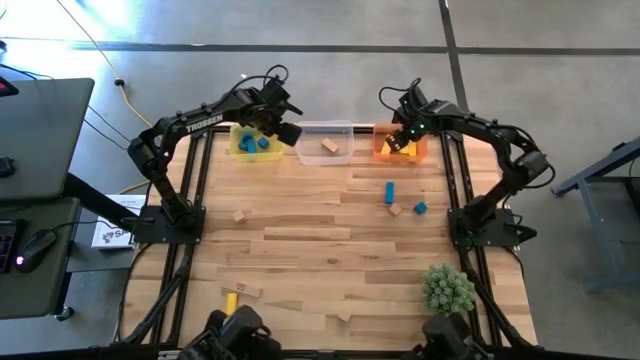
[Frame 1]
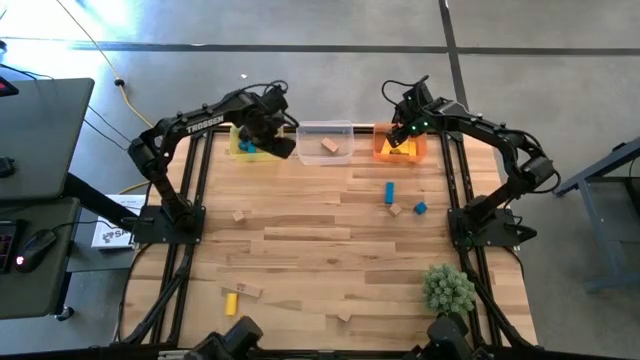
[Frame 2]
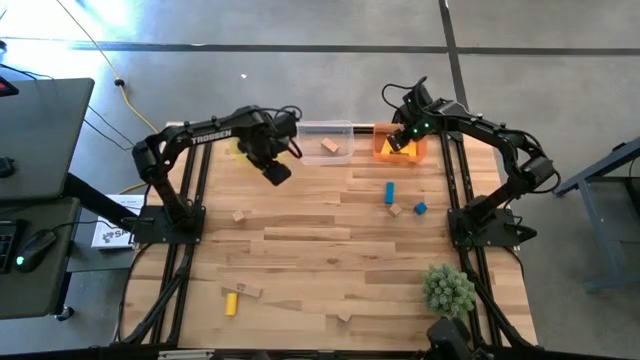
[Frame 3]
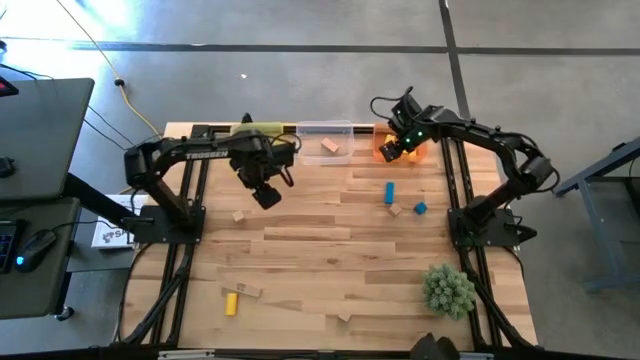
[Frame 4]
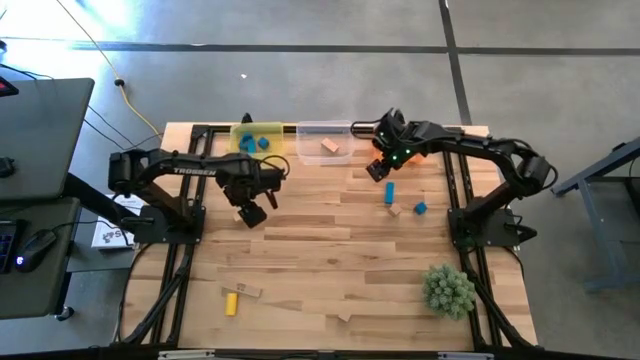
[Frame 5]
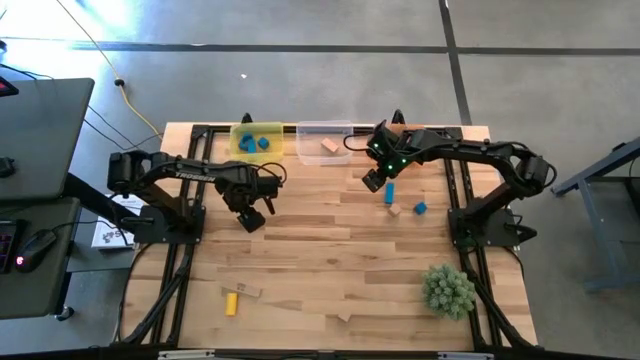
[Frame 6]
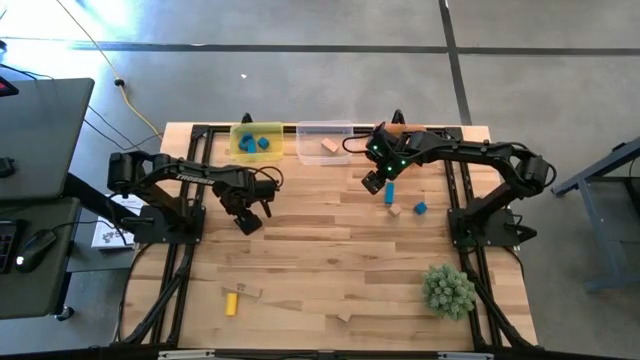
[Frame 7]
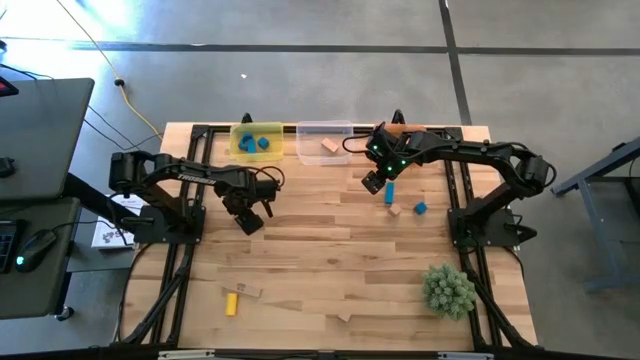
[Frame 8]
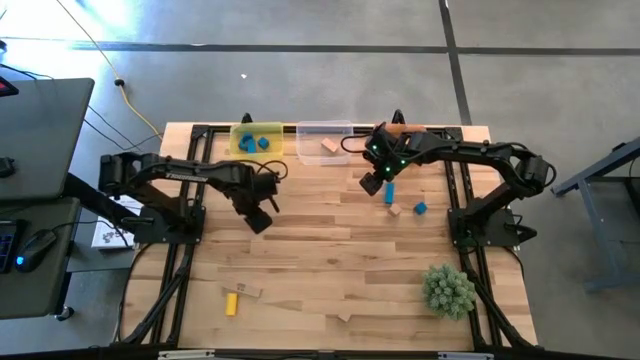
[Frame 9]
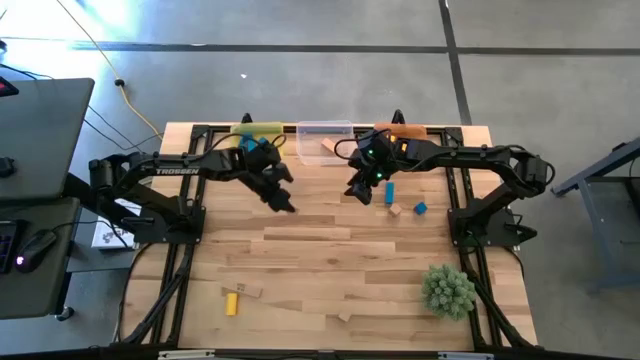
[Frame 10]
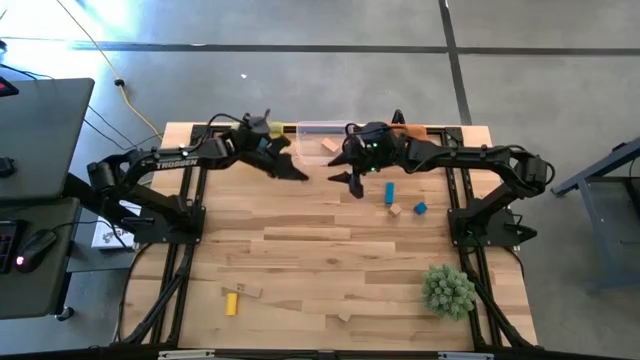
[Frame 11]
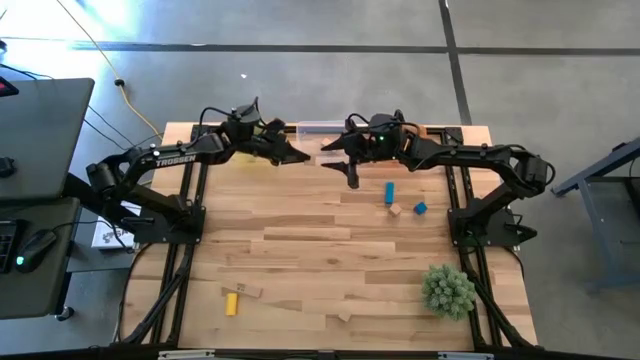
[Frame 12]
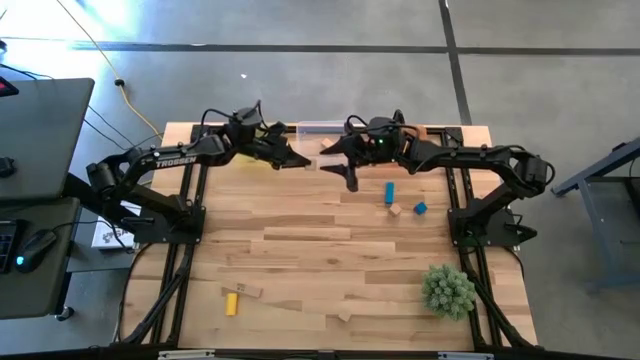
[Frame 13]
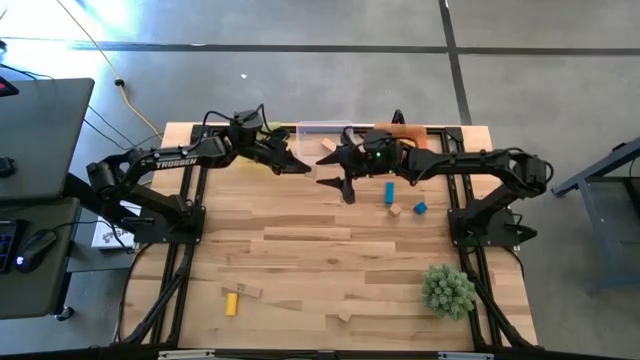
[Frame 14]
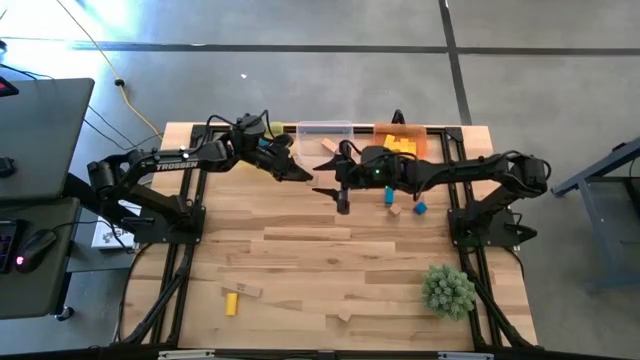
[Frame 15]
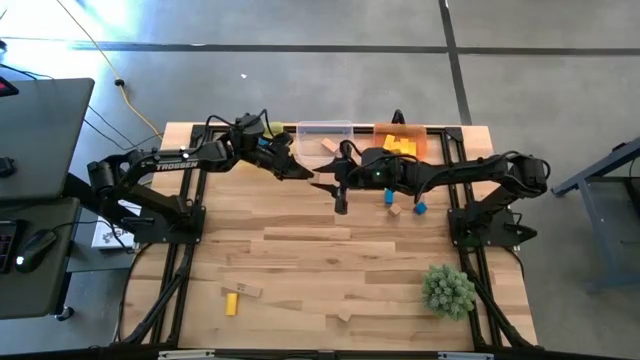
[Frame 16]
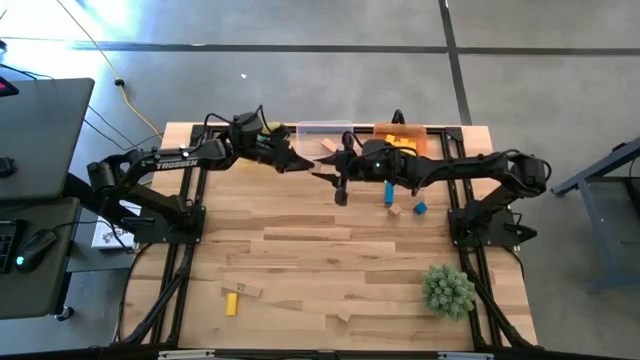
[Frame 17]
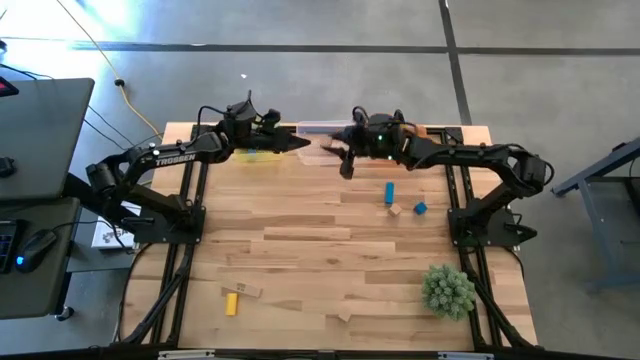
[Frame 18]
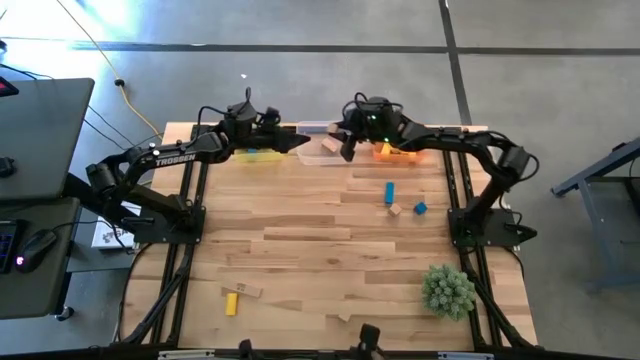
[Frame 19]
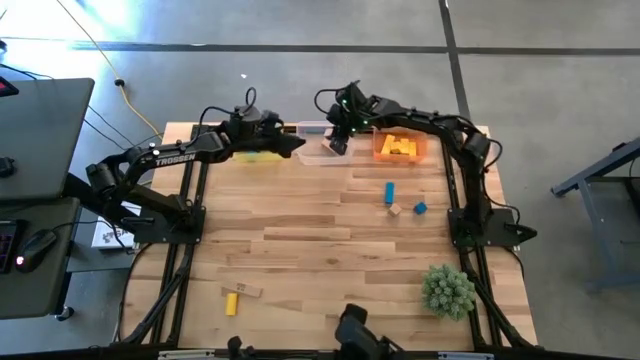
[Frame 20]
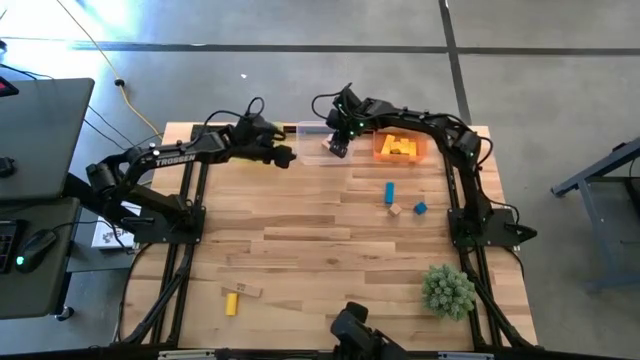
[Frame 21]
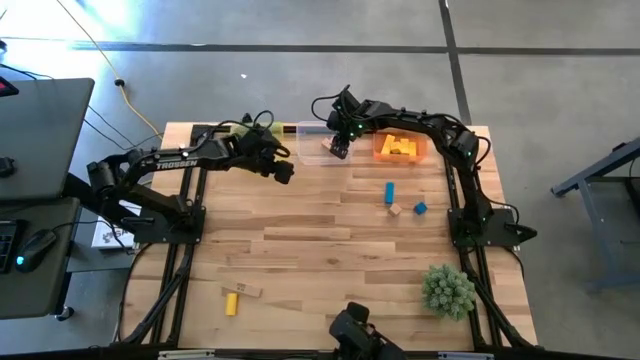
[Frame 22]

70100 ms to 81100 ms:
Task: Sort & place blocks by color
Put the light brown block into the transparent bin

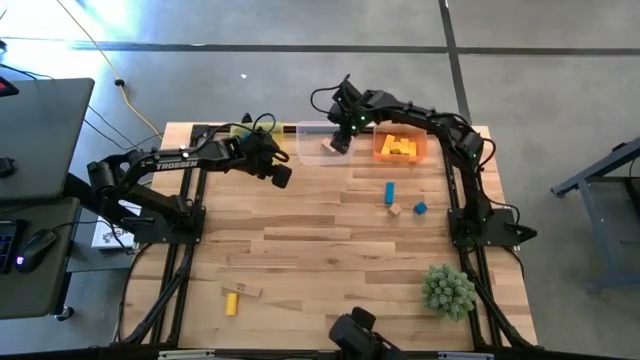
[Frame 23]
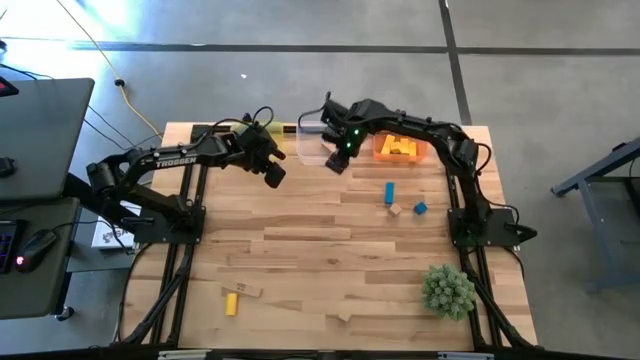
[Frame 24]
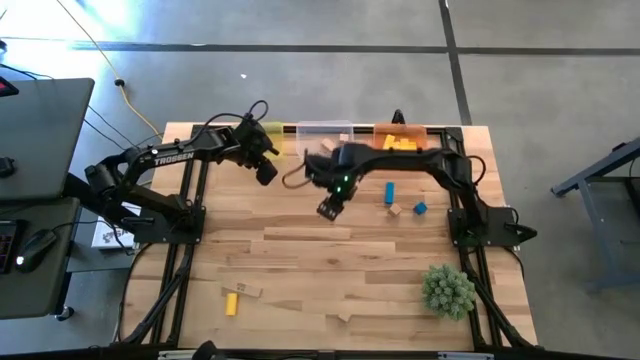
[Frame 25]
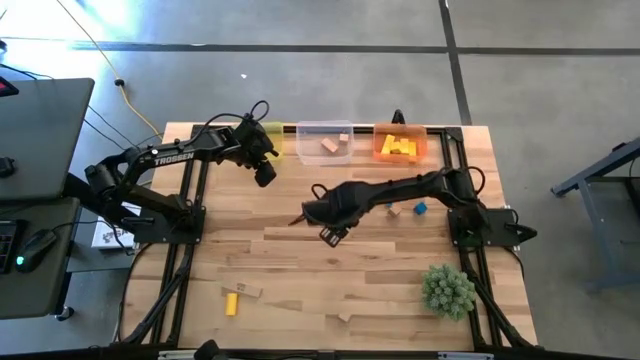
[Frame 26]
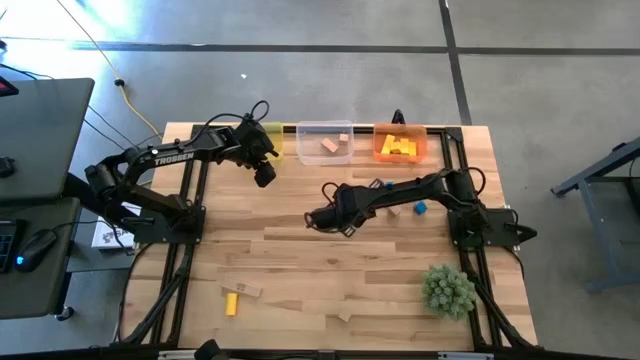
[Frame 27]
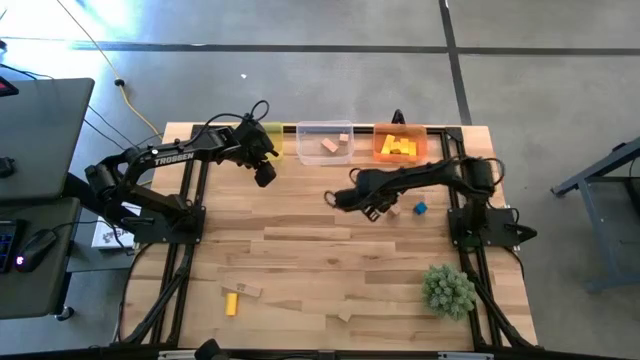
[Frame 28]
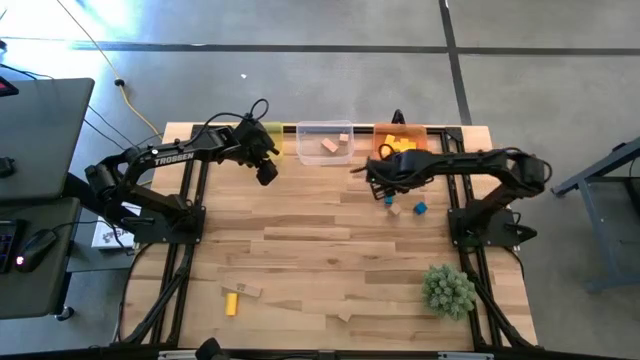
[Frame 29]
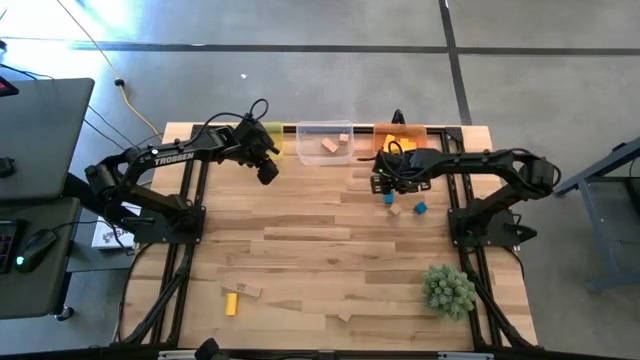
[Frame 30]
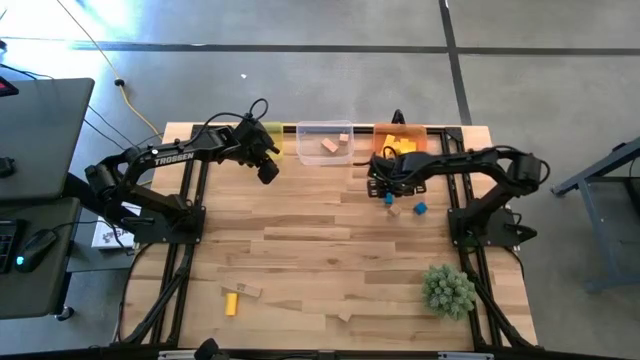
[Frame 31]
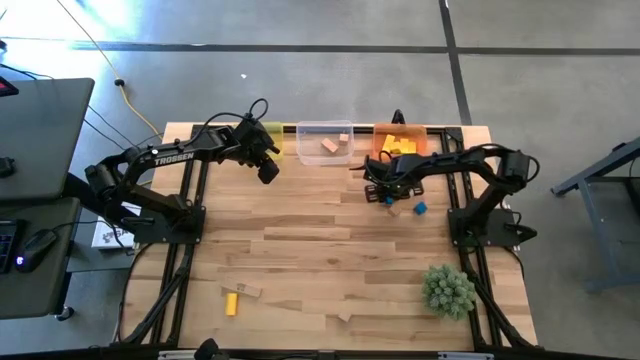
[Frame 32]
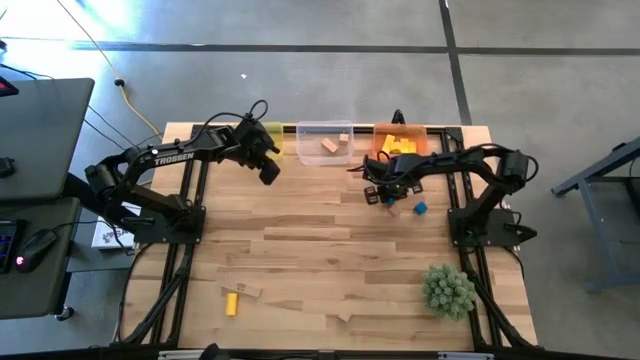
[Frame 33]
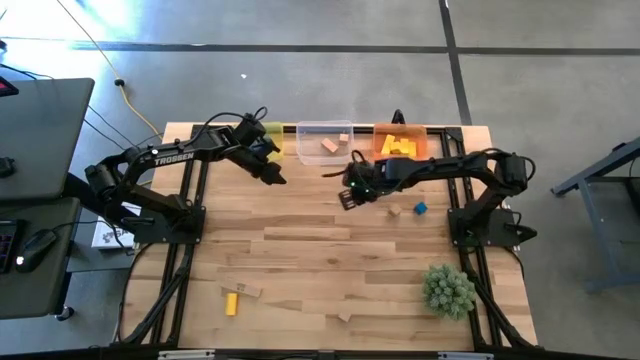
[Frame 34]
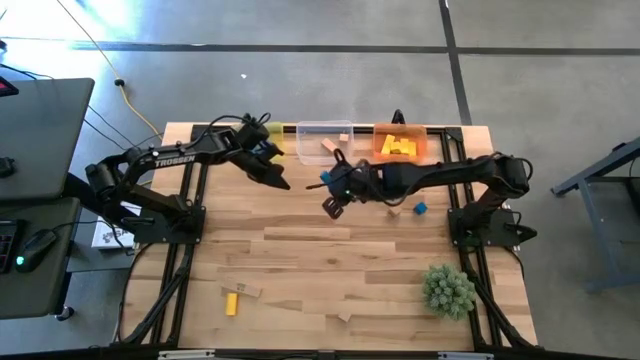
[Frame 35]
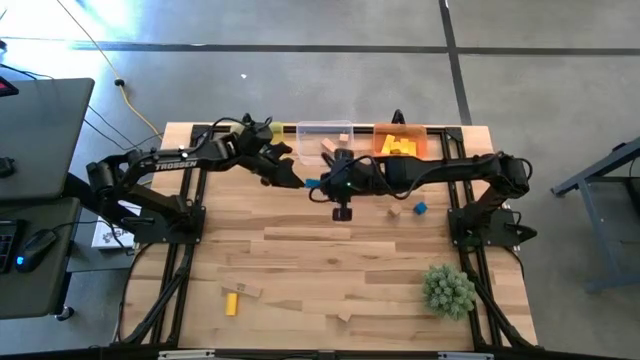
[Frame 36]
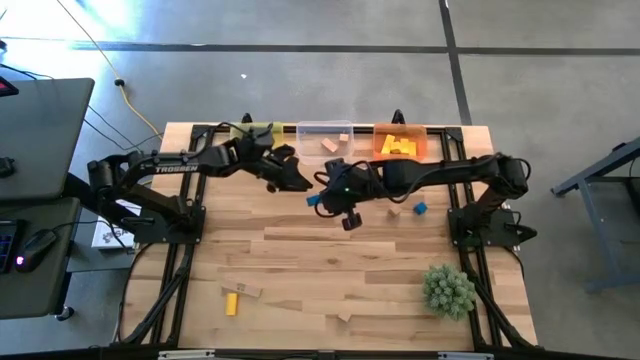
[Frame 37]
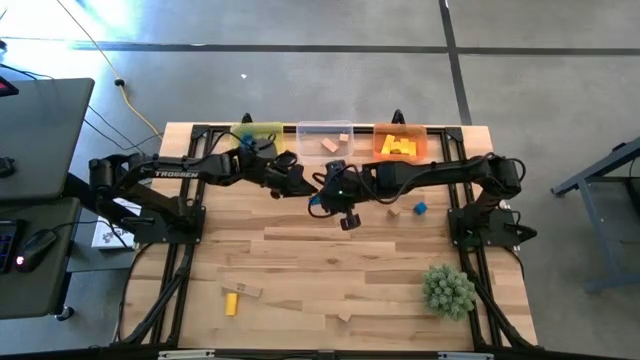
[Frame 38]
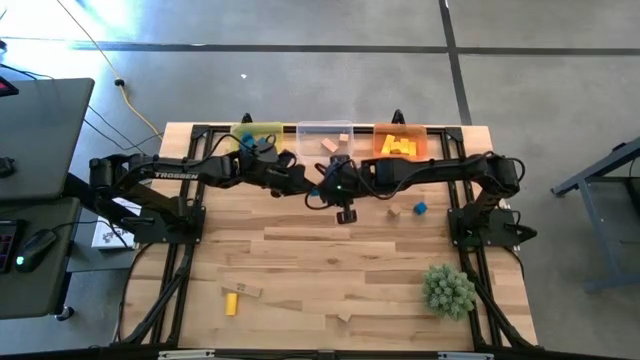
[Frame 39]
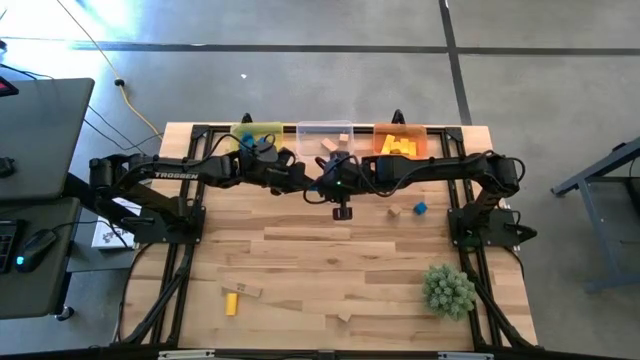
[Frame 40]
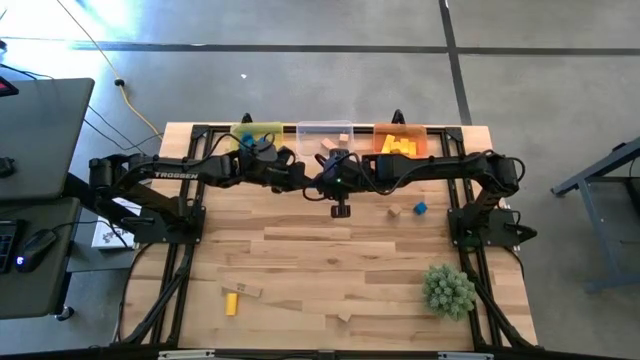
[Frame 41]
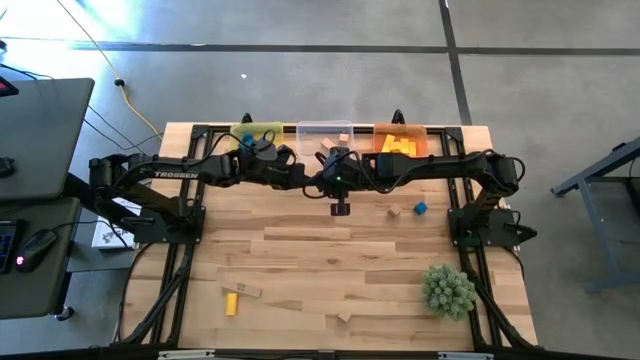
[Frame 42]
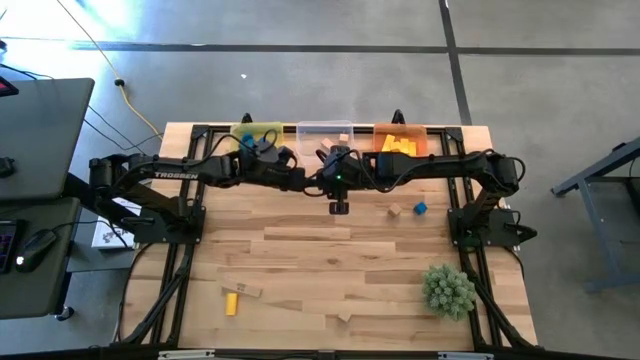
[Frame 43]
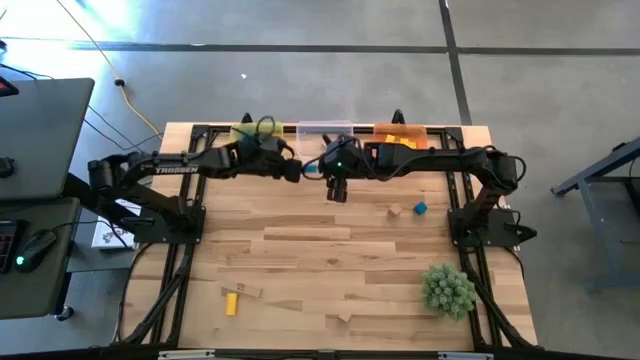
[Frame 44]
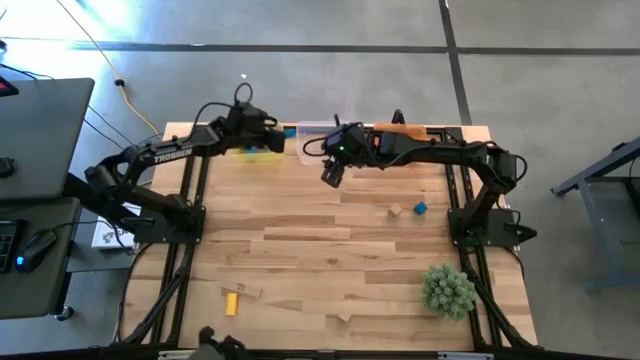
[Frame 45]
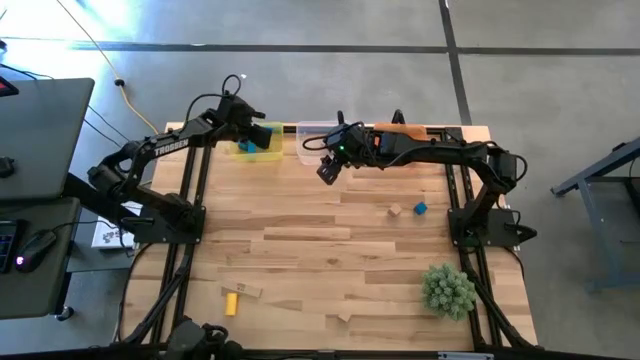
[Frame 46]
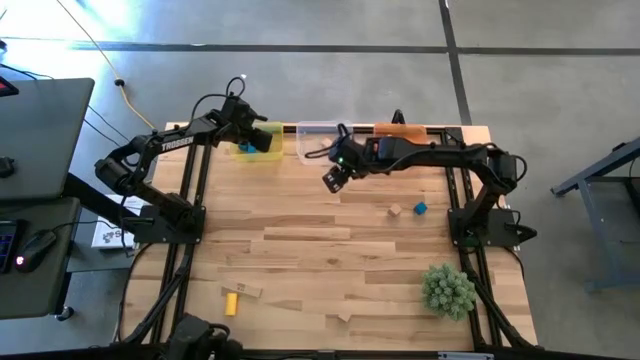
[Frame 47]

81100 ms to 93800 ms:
Put the blue block into the yellow bin
